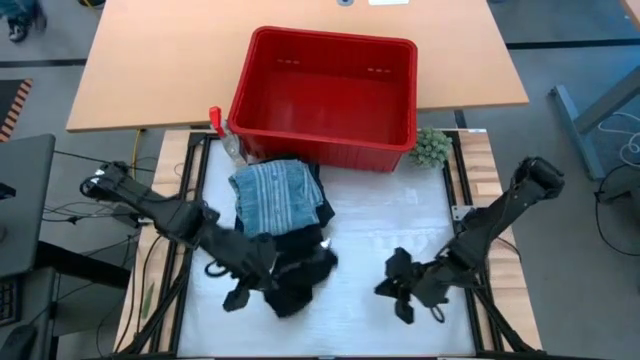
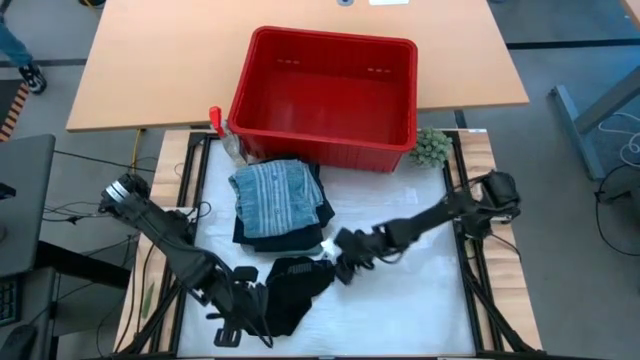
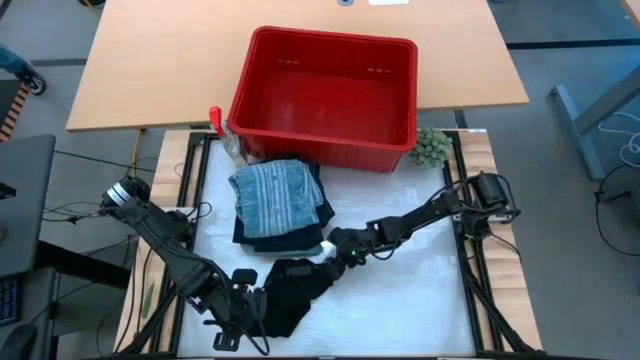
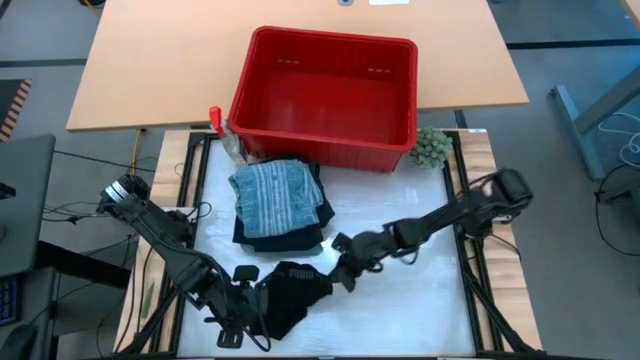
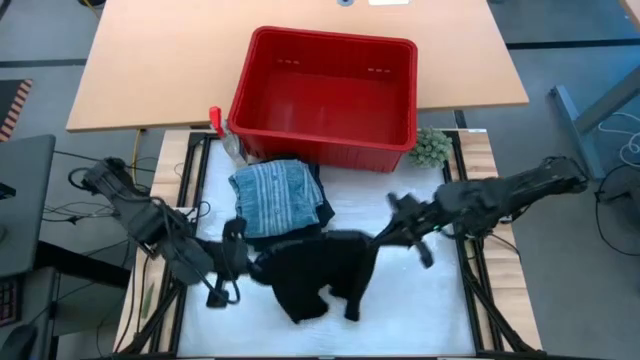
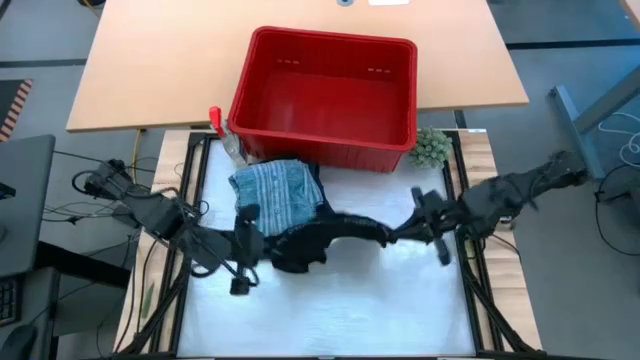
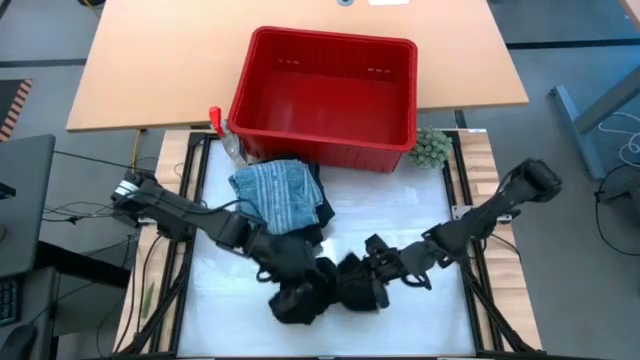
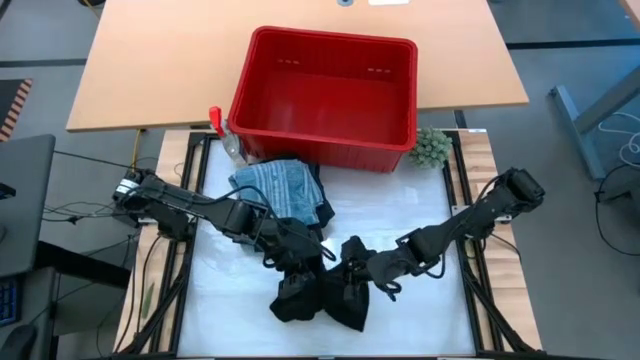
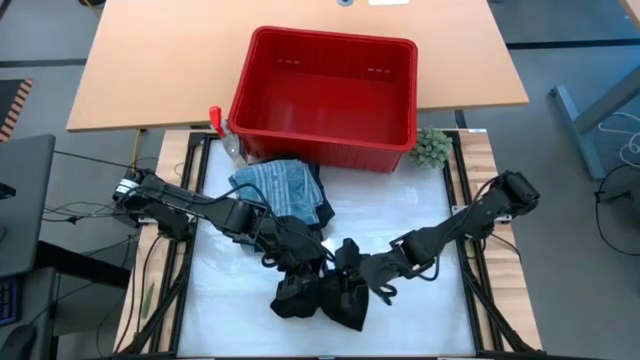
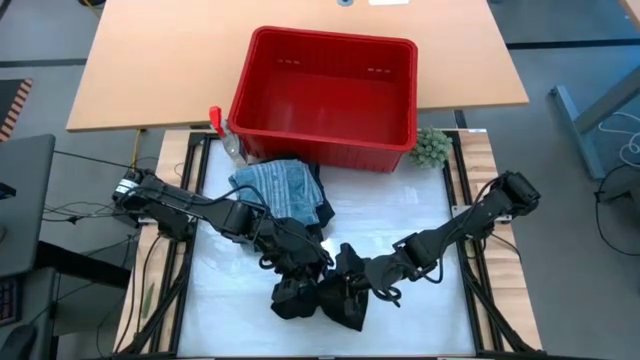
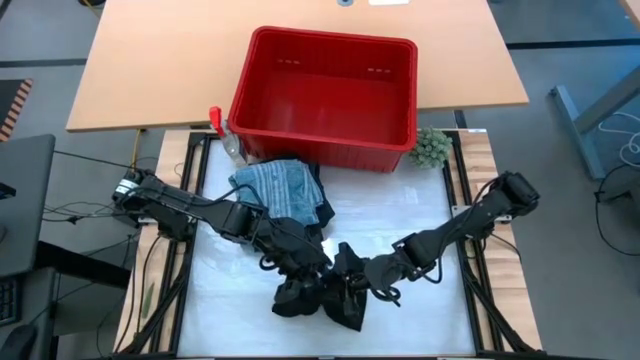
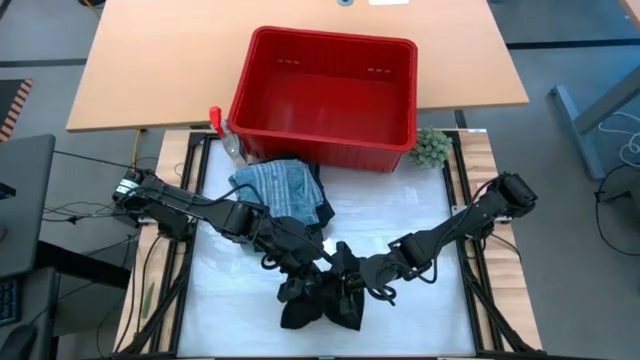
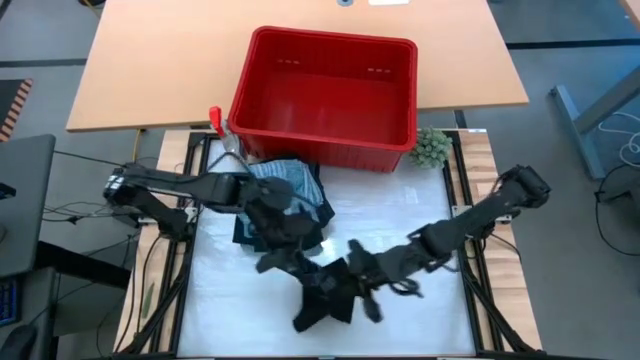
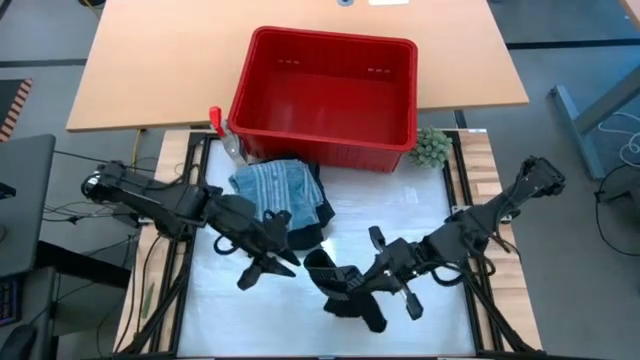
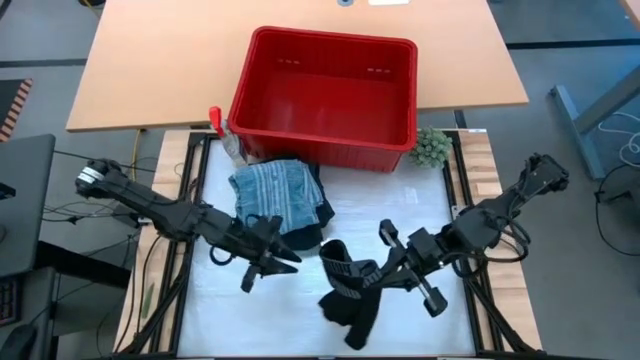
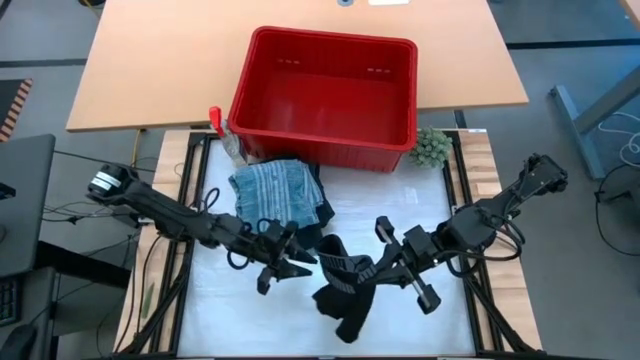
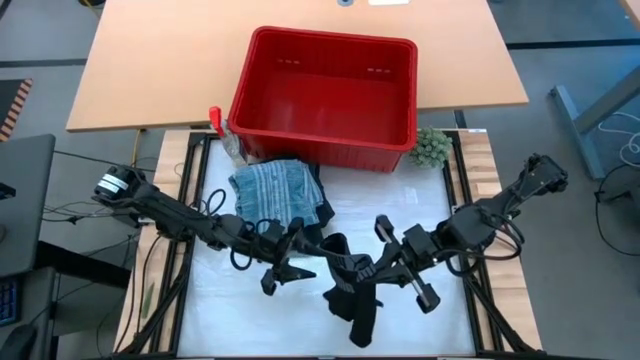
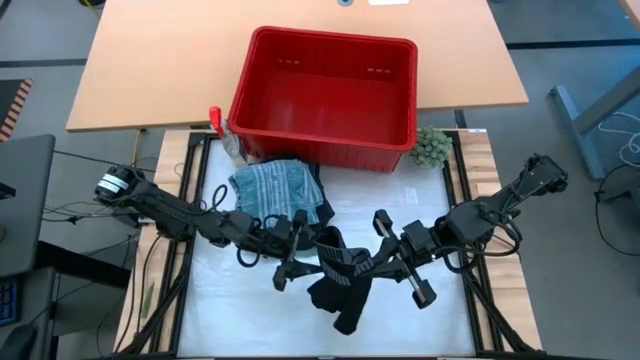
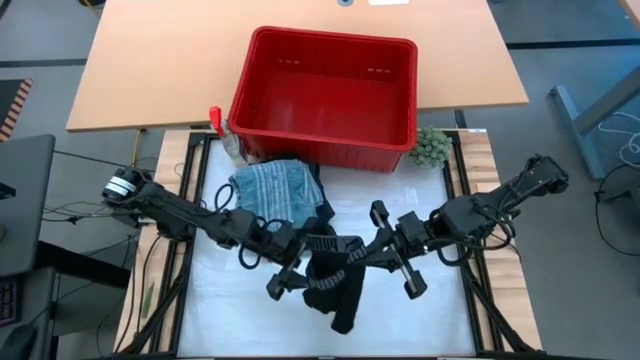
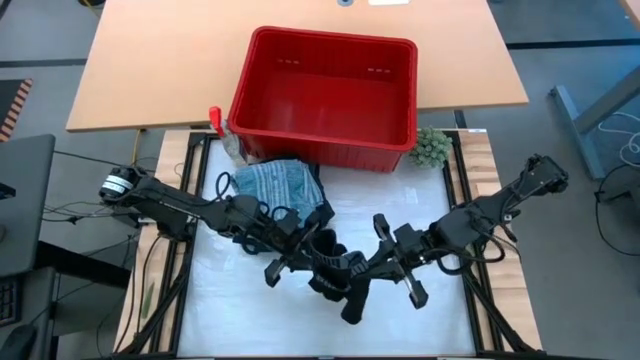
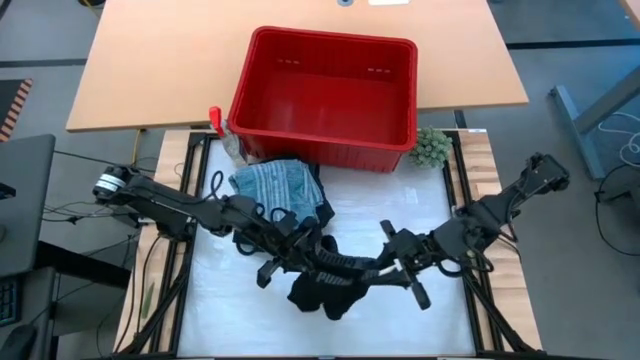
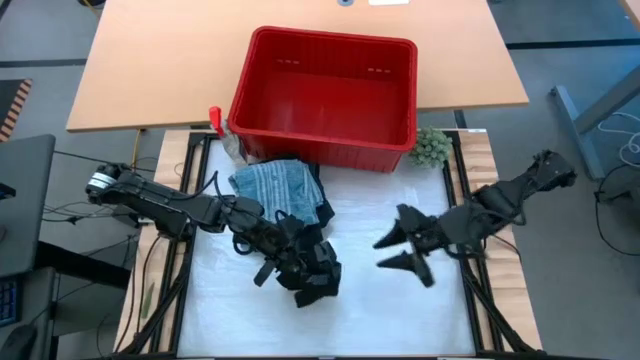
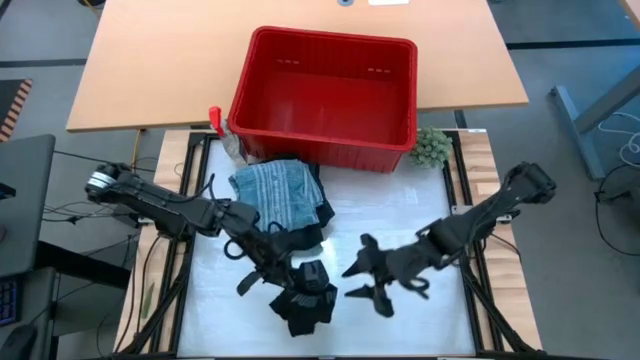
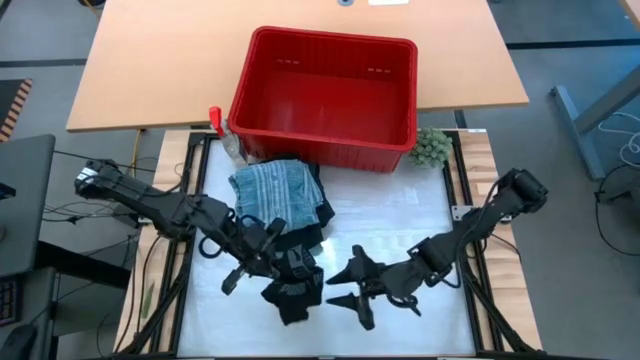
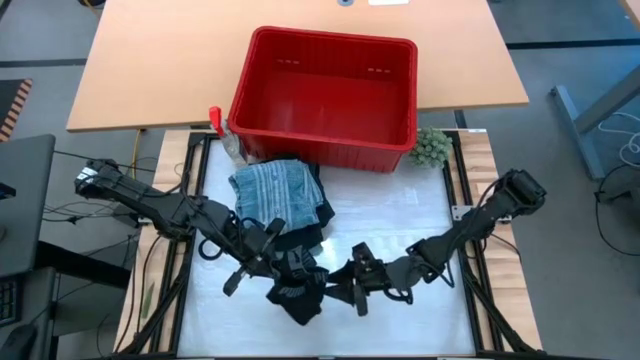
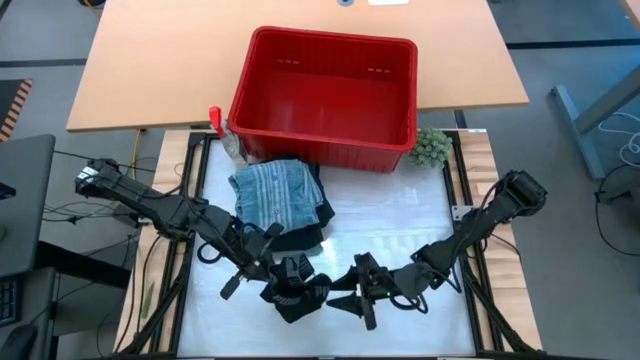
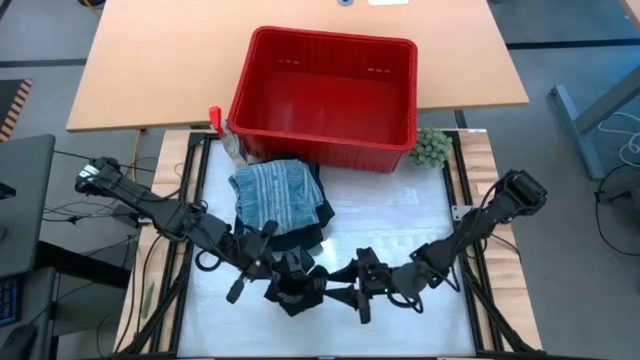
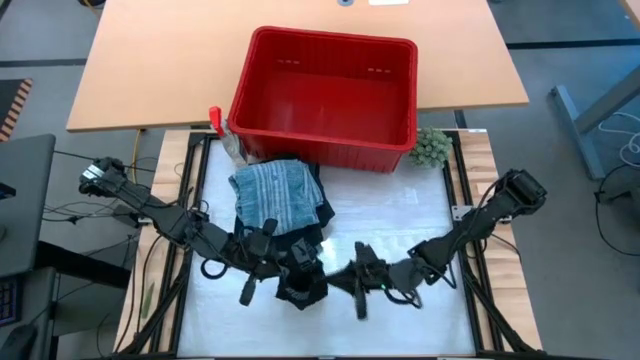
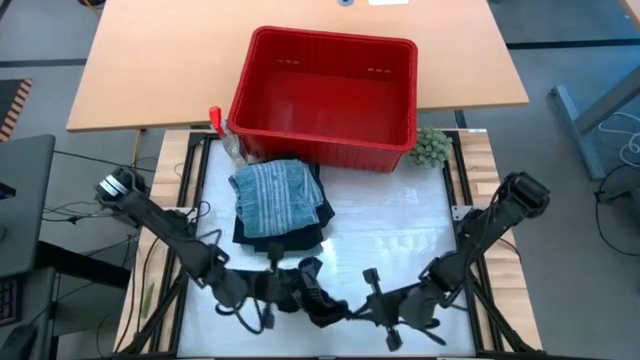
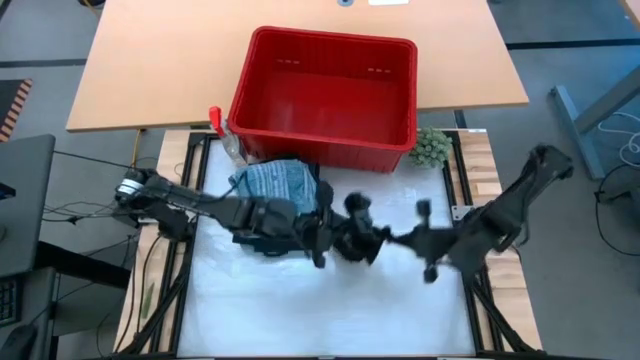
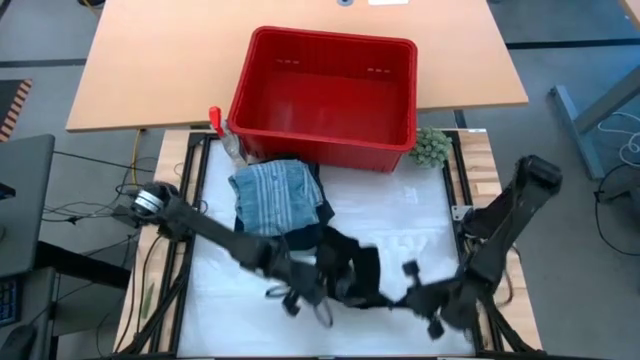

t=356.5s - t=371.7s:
Task: Fold laundry
Fold the black boxer from the red laundry bin

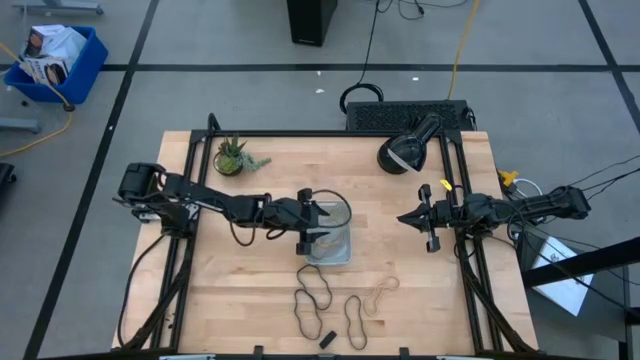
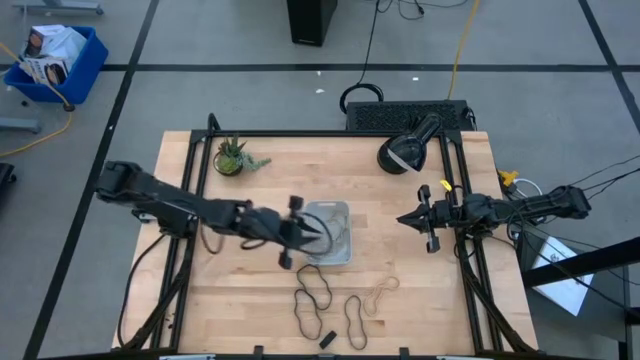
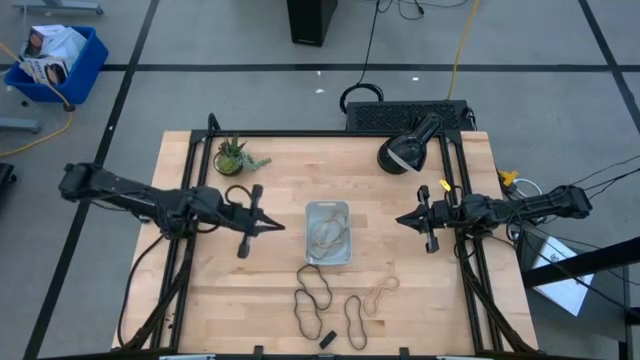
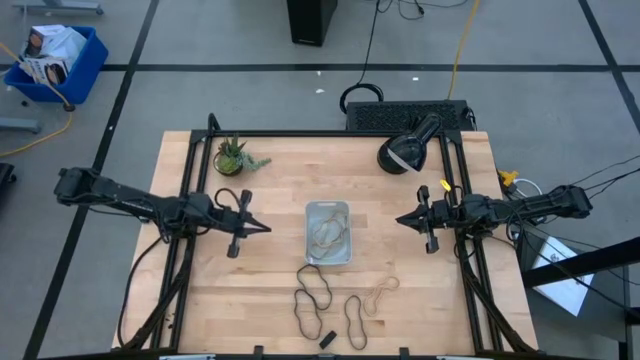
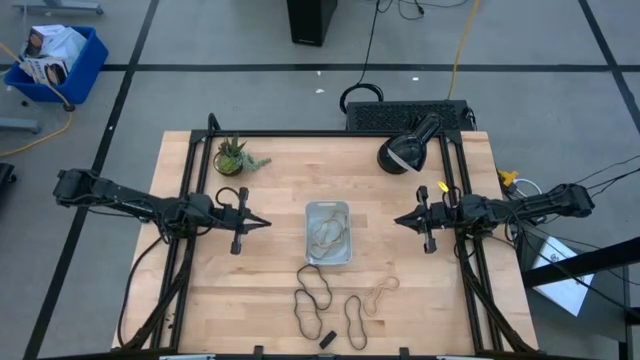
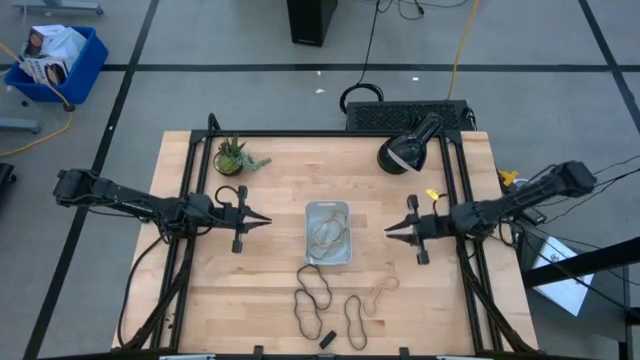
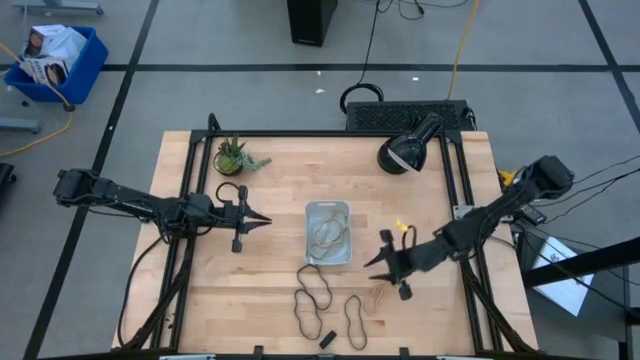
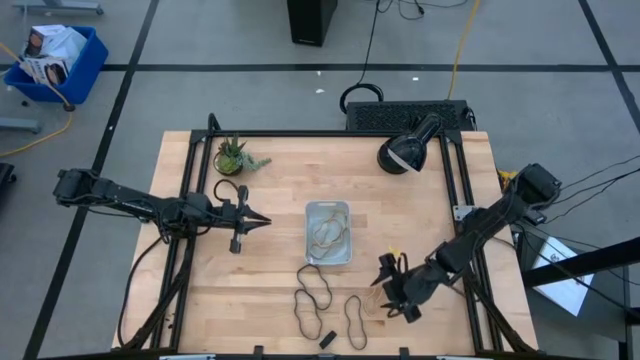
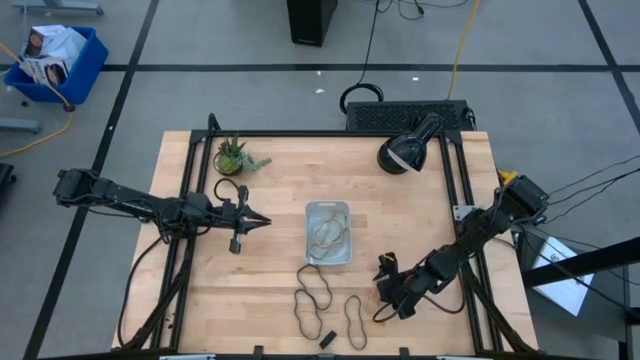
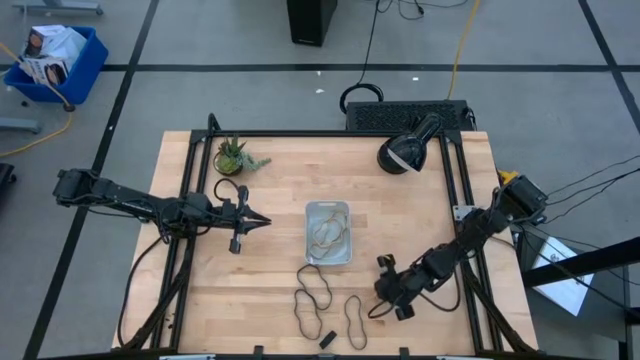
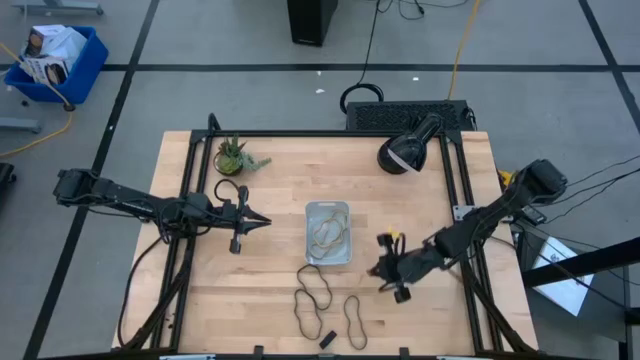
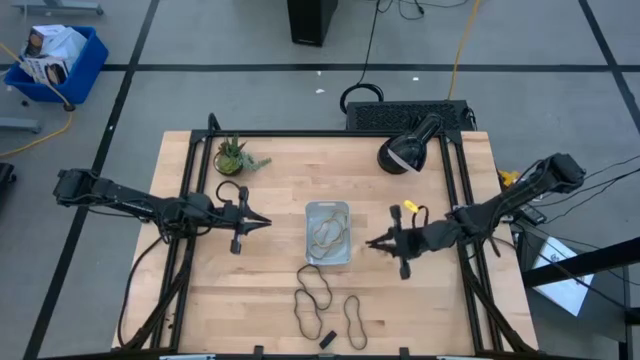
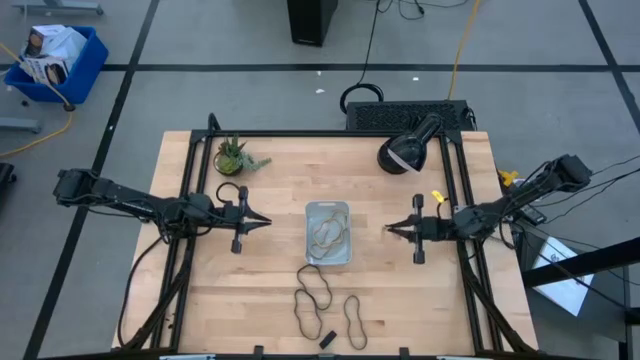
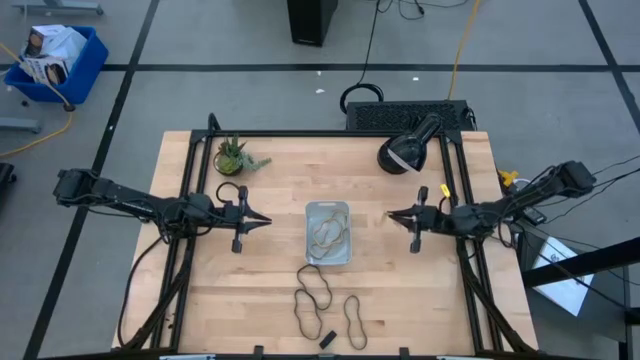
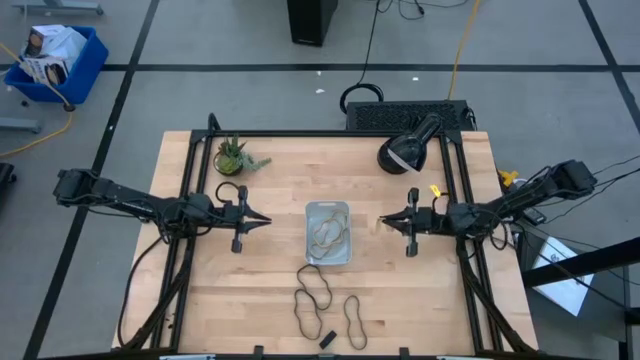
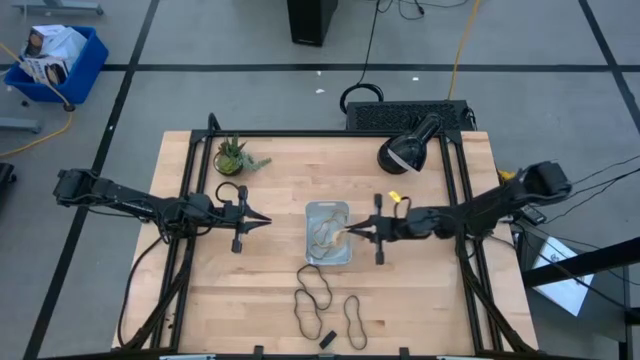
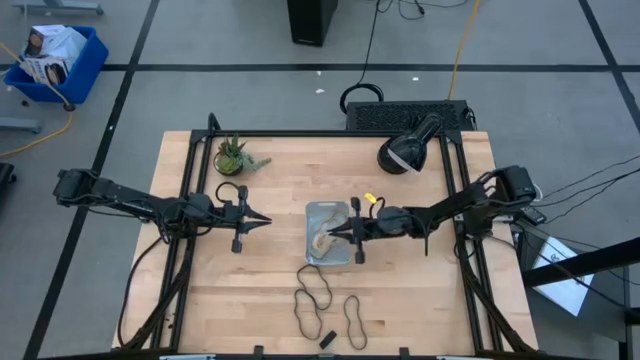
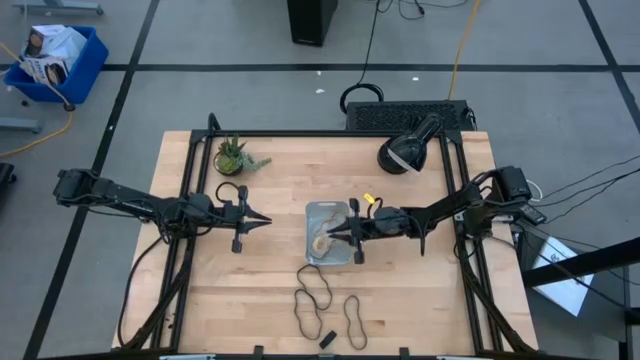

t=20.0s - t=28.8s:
Task: Pick and place rubber bands into bin
Put the light brown rubber band into the bin
